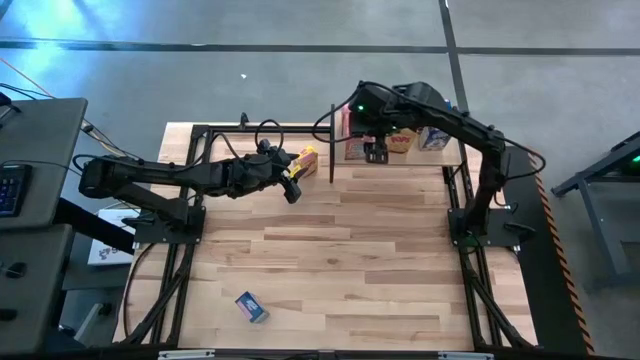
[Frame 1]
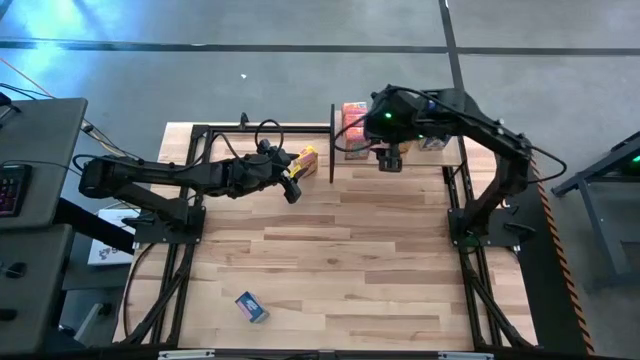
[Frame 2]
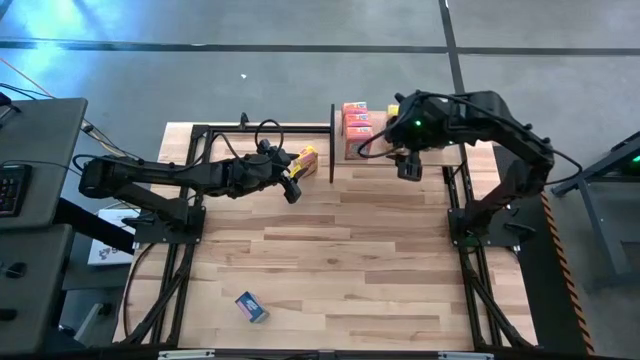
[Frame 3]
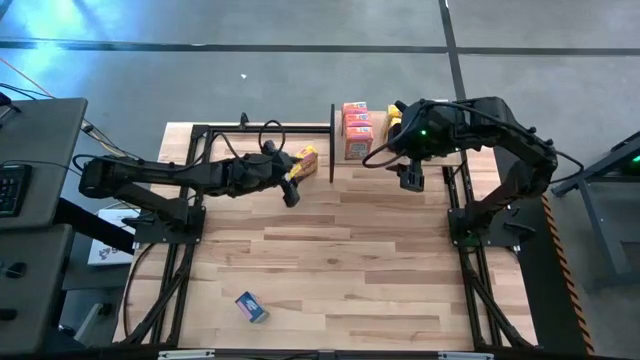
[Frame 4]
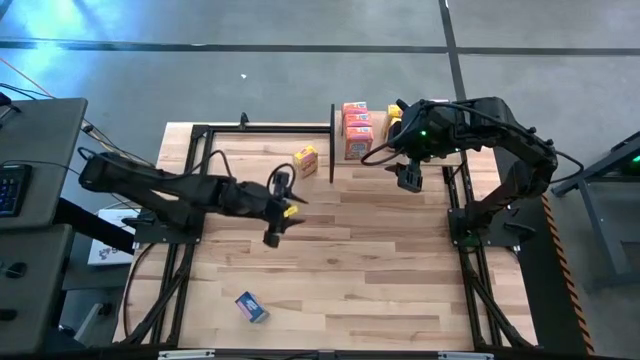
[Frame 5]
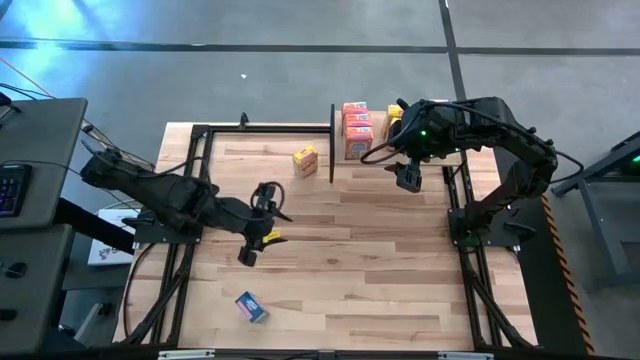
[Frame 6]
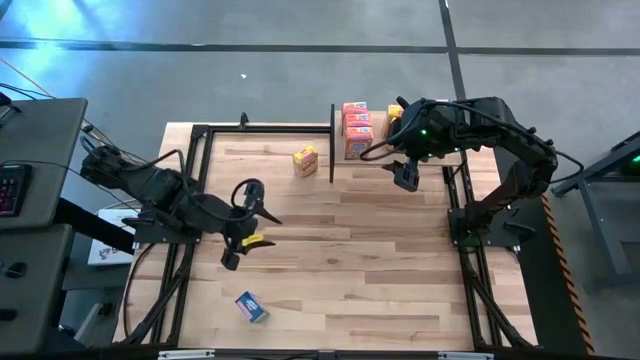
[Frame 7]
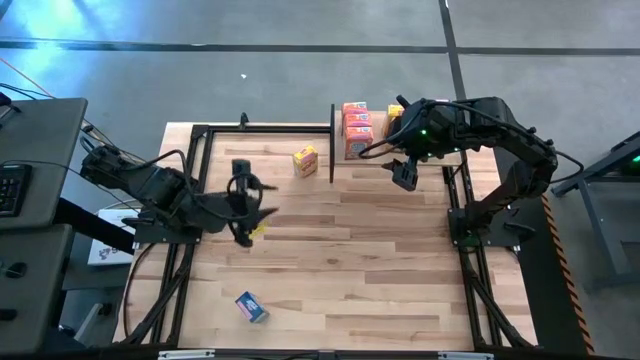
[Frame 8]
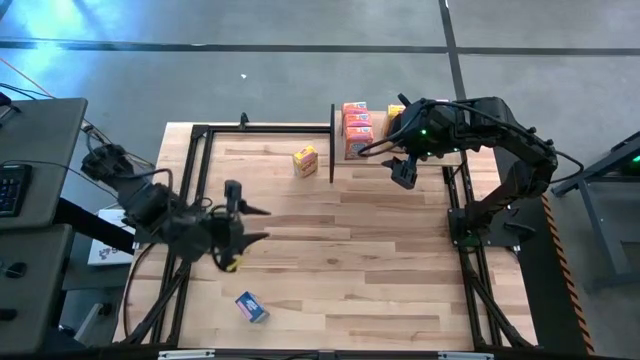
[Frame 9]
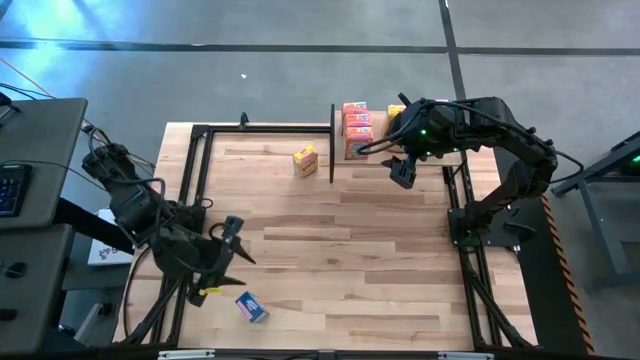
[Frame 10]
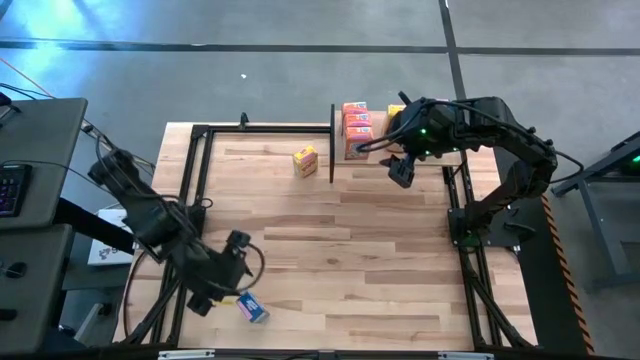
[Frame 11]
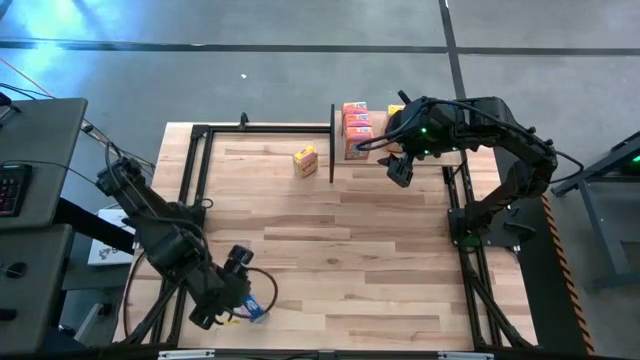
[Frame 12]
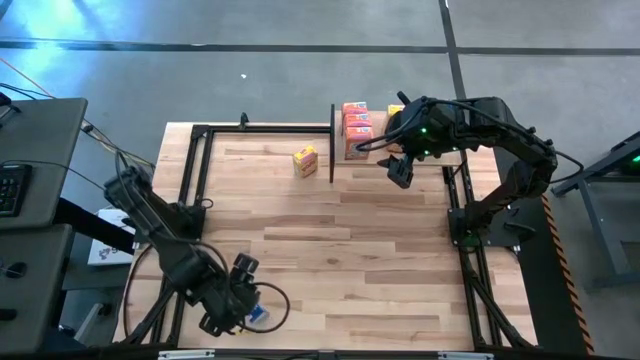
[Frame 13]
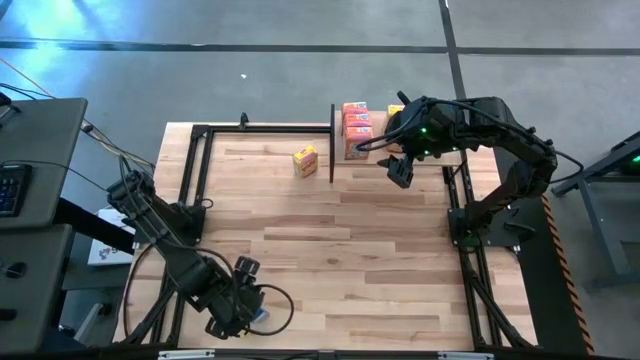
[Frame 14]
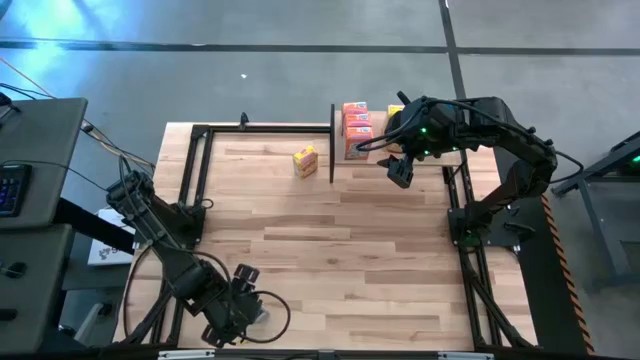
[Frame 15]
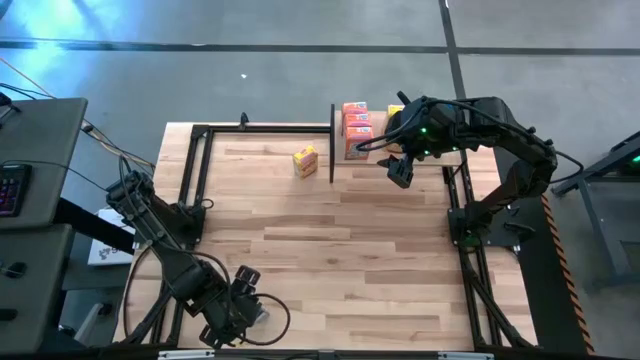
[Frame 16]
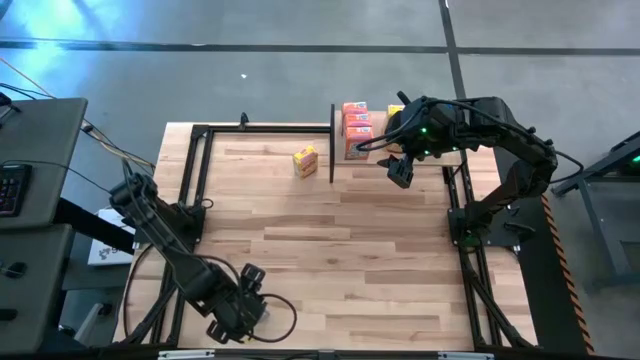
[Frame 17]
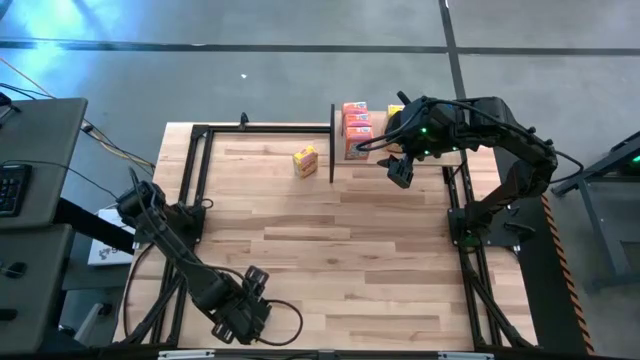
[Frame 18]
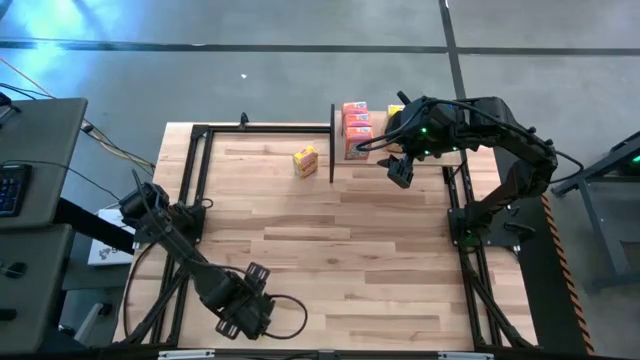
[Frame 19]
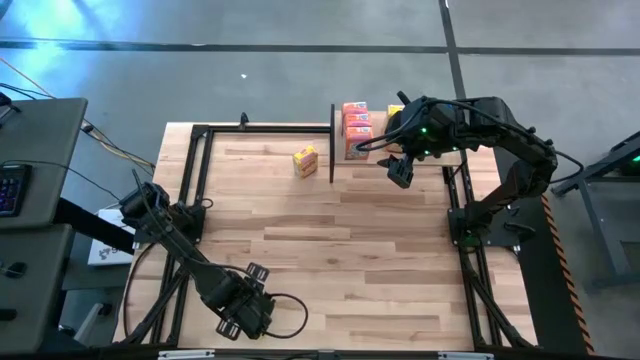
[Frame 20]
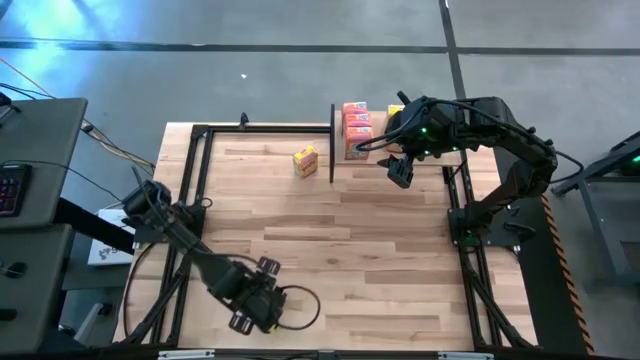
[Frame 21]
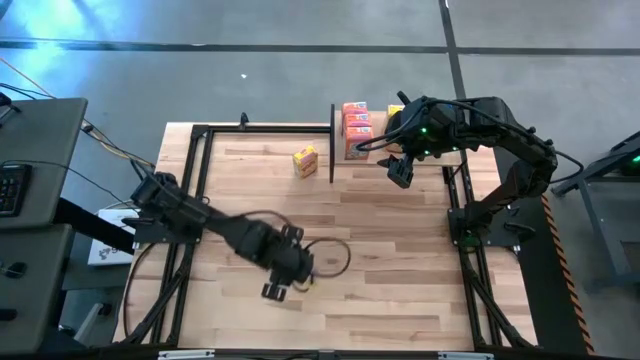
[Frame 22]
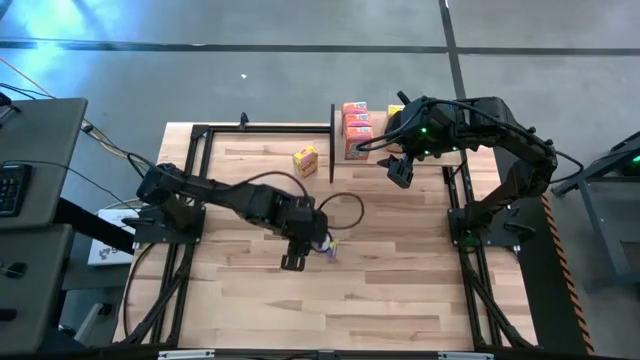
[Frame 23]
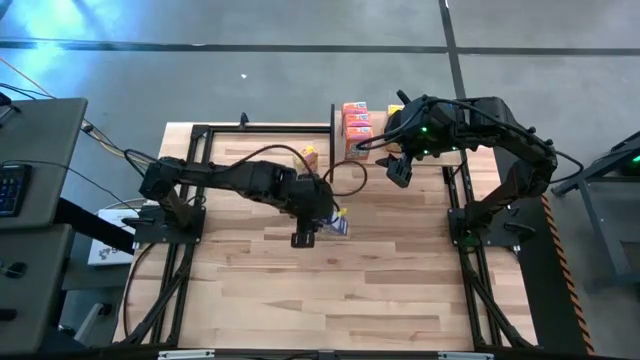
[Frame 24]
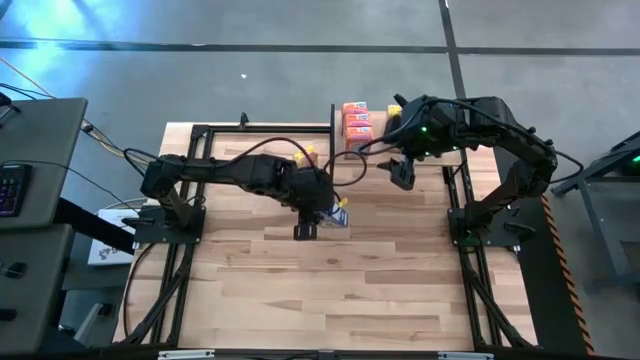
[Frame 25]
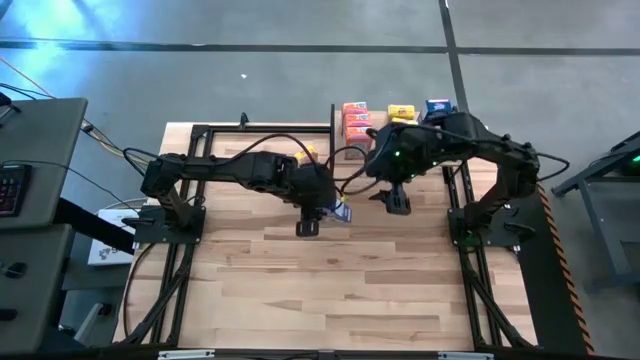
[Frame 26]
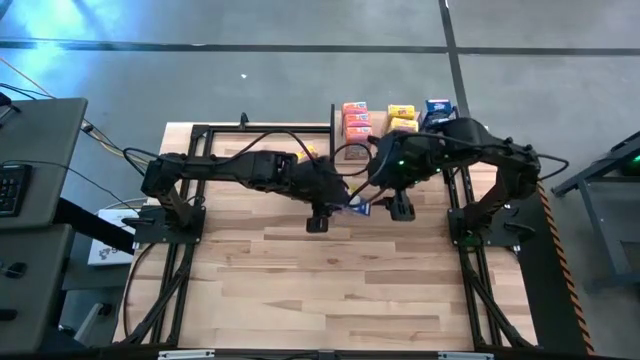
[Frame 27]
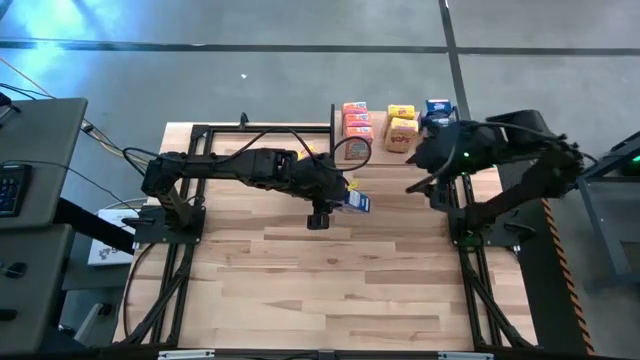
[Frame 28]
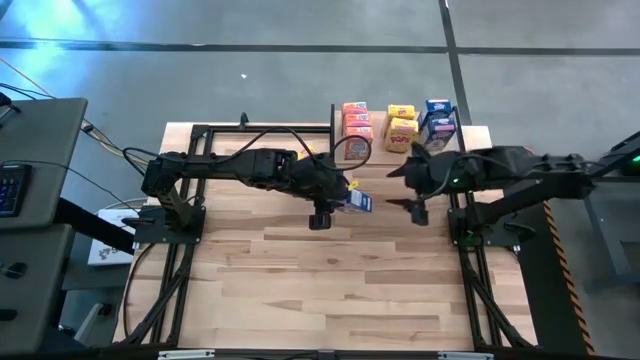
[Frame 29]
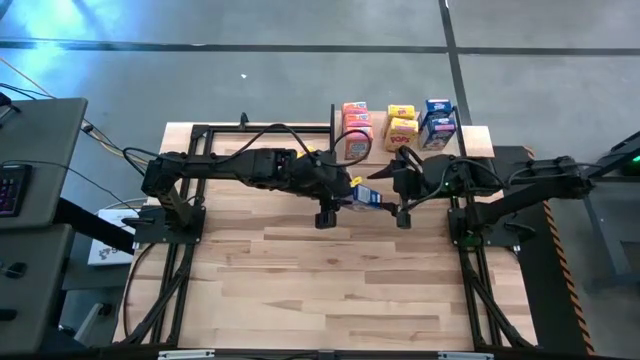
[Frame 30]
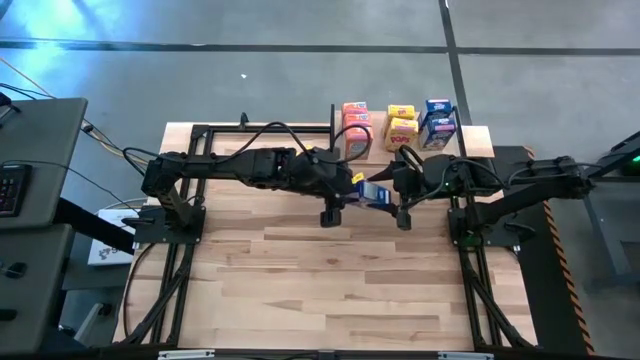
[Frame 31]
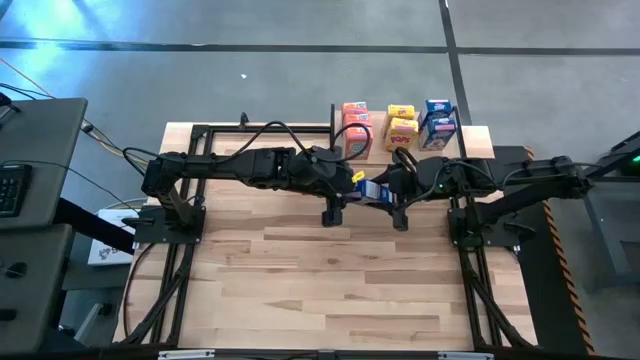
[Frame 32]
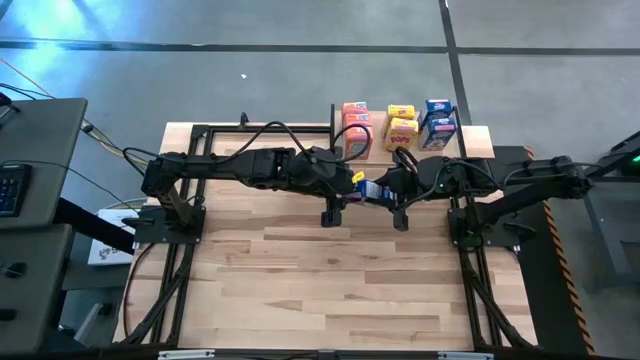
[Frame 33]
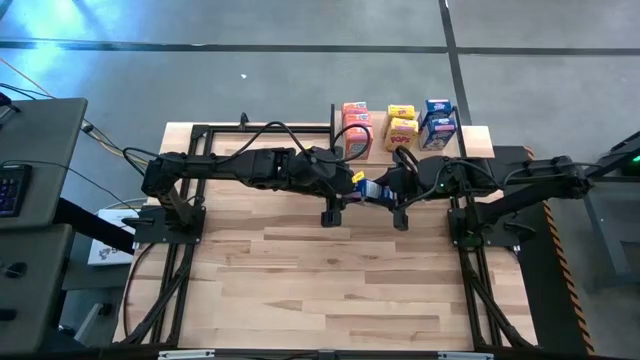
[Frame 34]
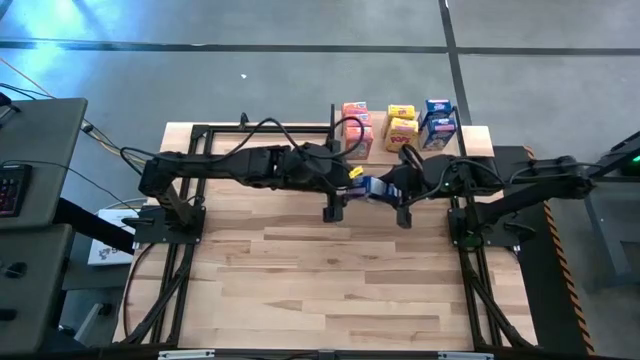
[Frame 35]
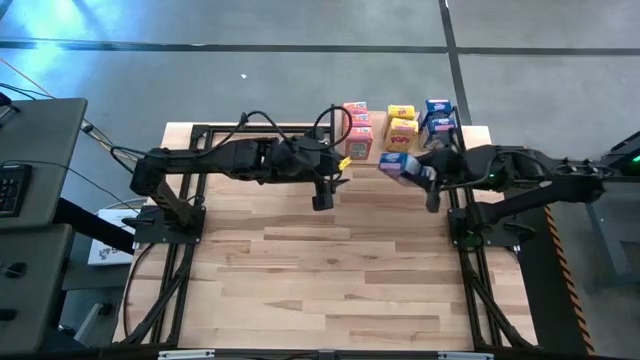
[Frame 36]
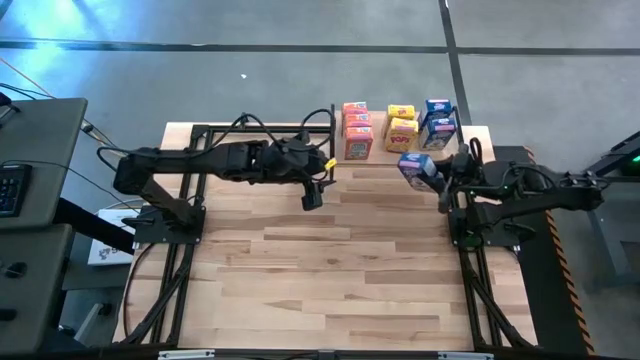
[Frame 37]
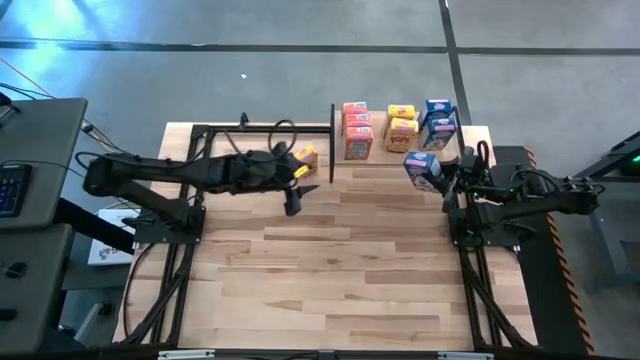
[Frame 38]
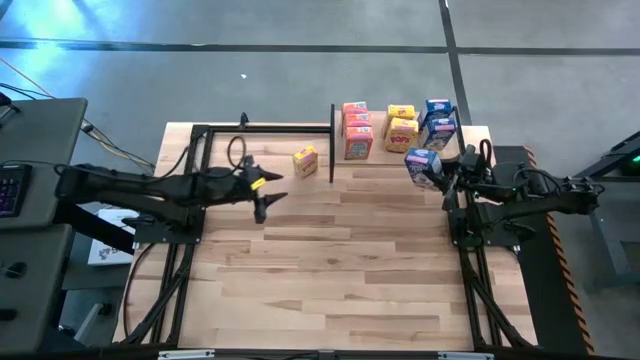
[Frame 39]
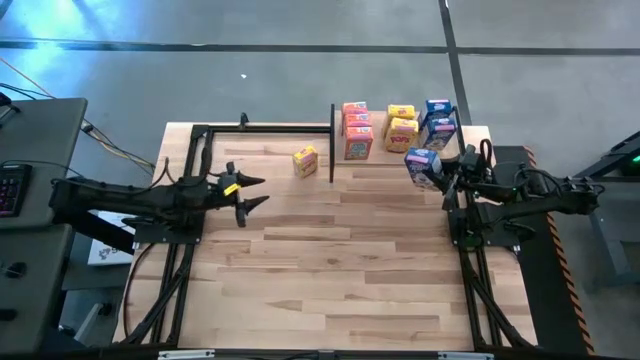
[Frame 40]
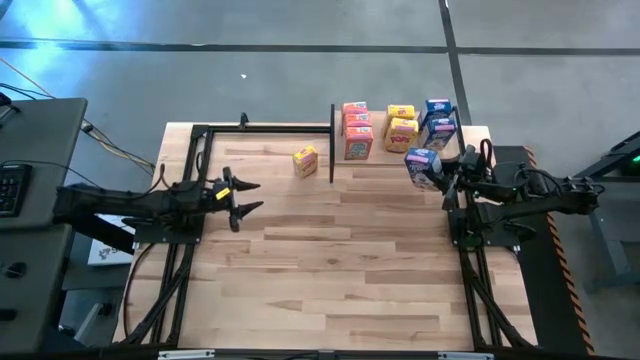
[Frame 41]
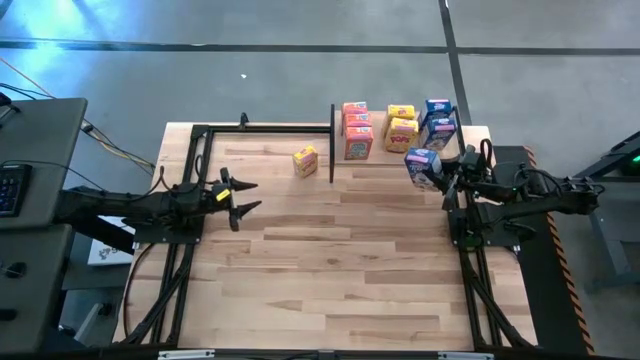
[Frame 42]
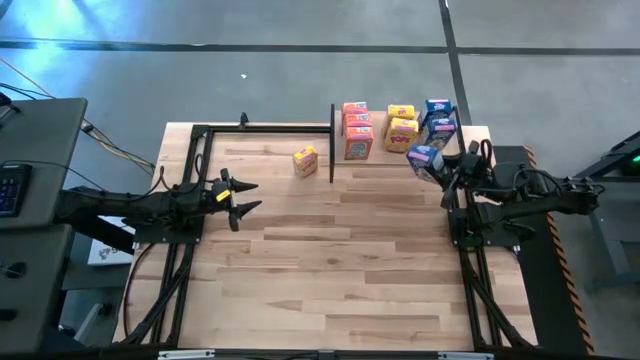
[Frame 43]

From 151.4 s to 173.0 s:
Task: Stack cereal on shelf
Put the blue cereal box on the shelf aligned with the other blue cereal boxes
